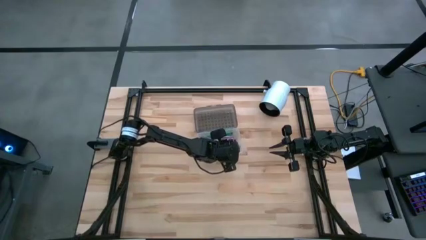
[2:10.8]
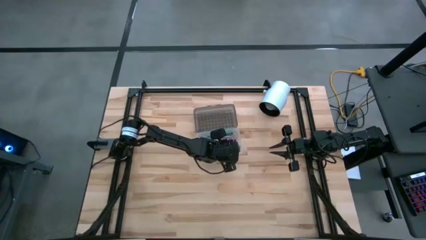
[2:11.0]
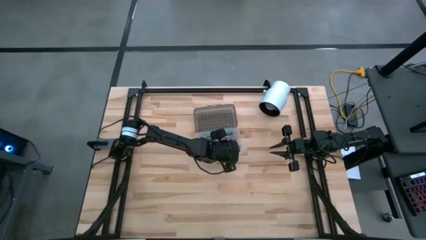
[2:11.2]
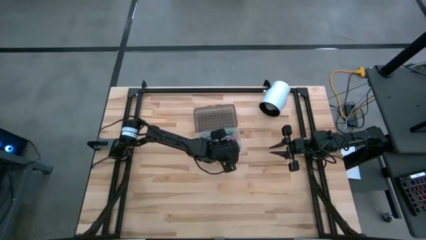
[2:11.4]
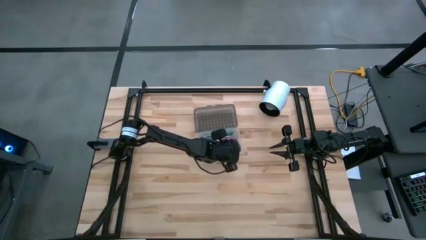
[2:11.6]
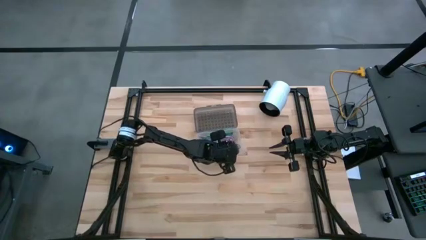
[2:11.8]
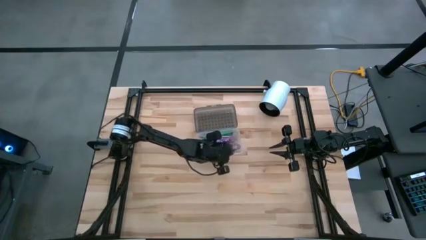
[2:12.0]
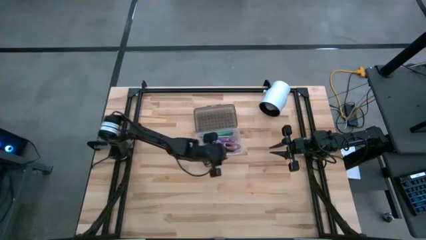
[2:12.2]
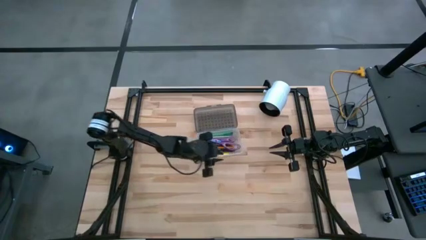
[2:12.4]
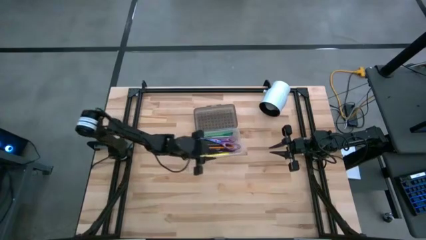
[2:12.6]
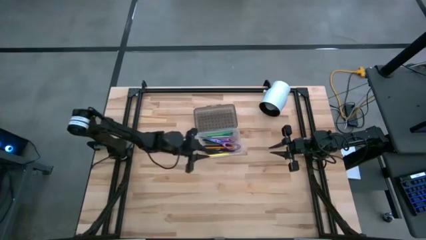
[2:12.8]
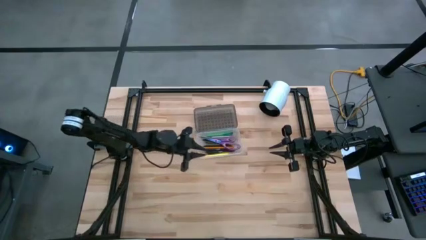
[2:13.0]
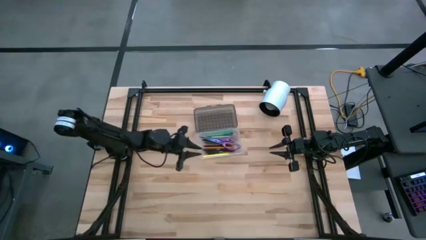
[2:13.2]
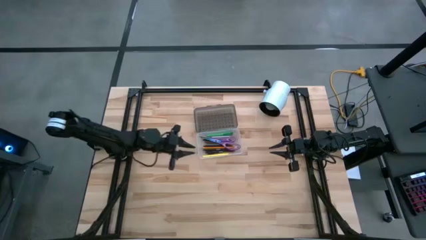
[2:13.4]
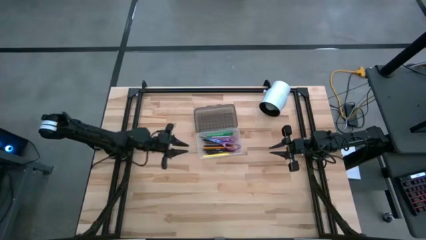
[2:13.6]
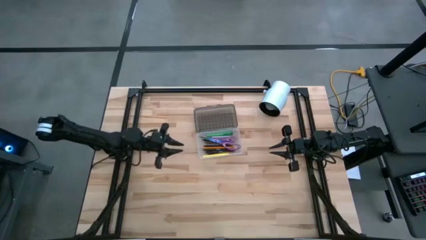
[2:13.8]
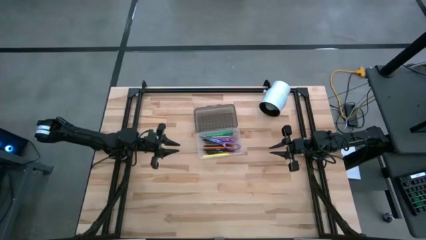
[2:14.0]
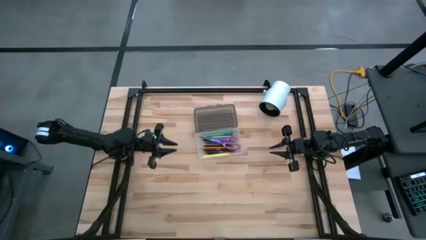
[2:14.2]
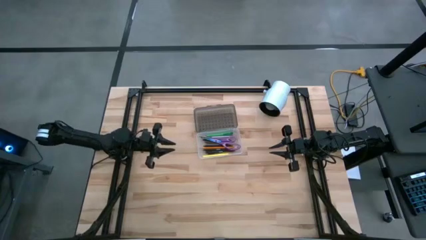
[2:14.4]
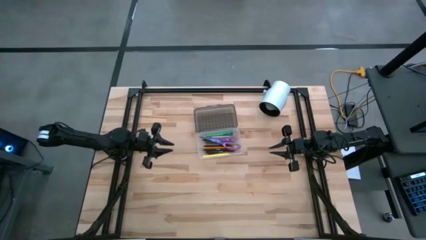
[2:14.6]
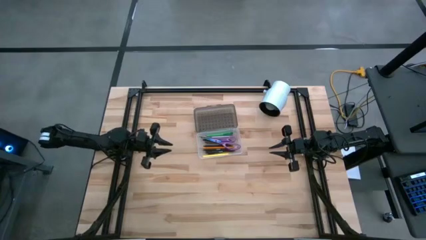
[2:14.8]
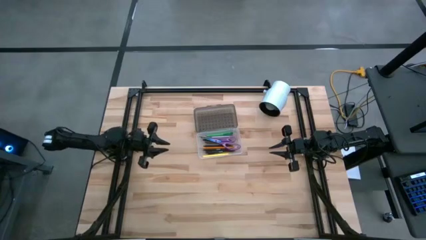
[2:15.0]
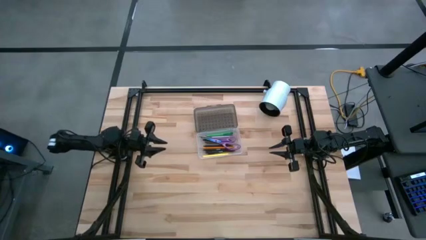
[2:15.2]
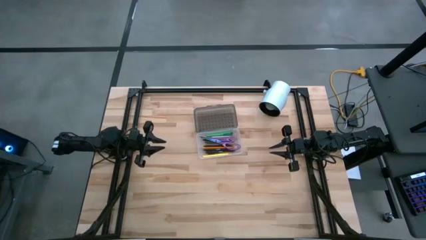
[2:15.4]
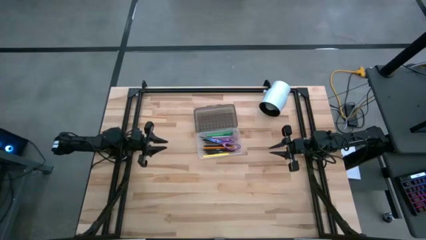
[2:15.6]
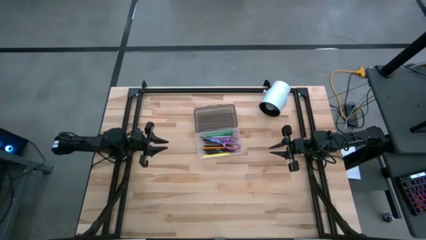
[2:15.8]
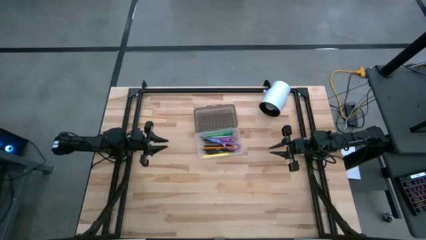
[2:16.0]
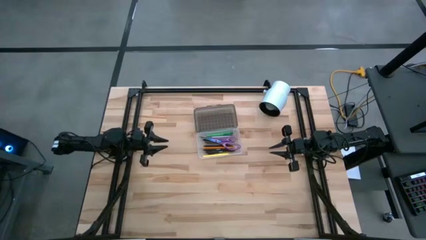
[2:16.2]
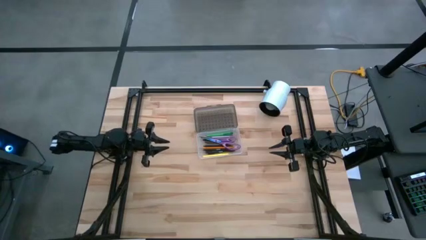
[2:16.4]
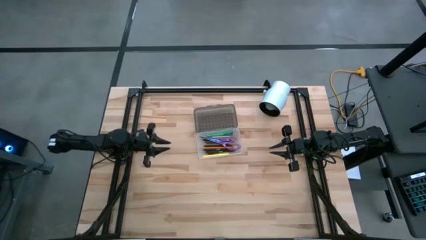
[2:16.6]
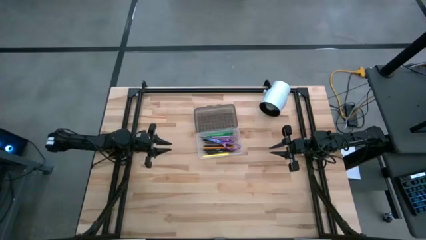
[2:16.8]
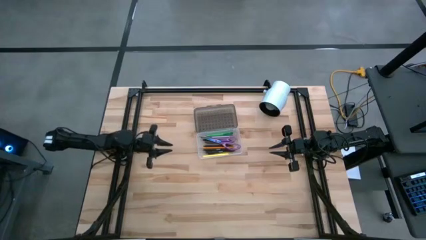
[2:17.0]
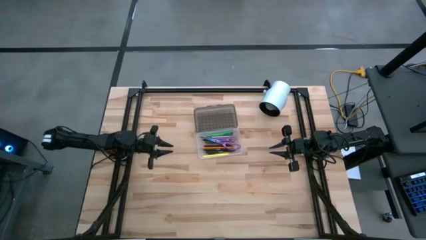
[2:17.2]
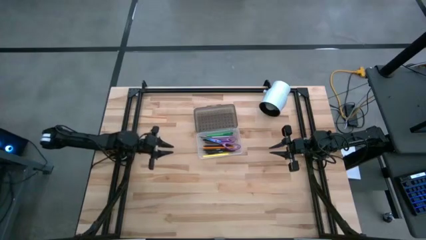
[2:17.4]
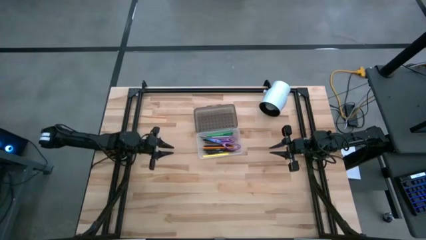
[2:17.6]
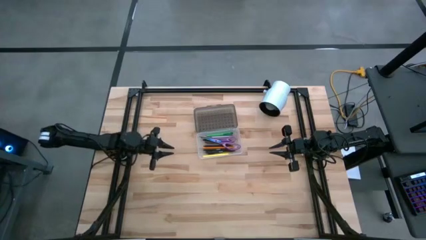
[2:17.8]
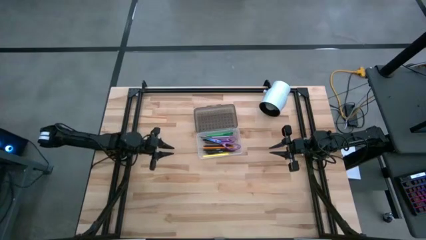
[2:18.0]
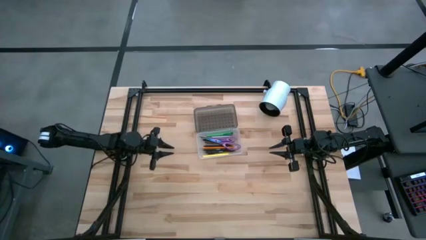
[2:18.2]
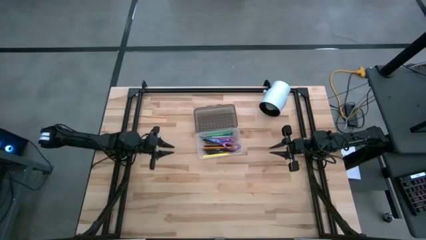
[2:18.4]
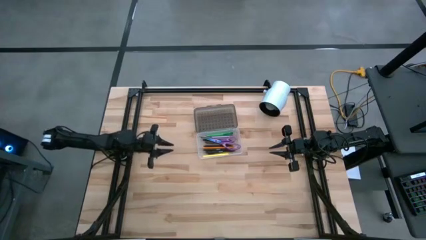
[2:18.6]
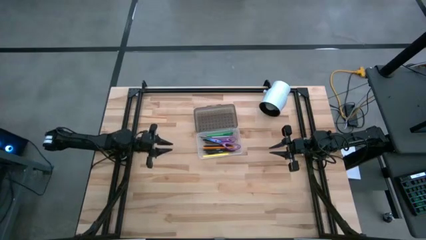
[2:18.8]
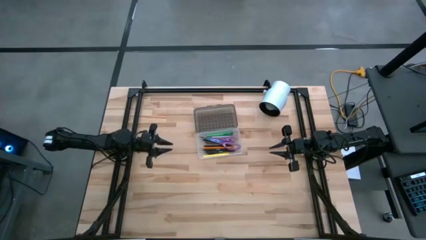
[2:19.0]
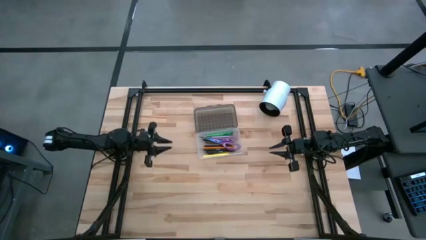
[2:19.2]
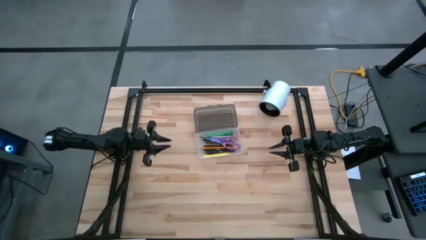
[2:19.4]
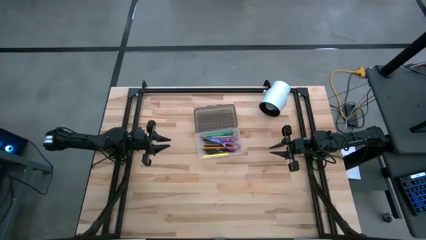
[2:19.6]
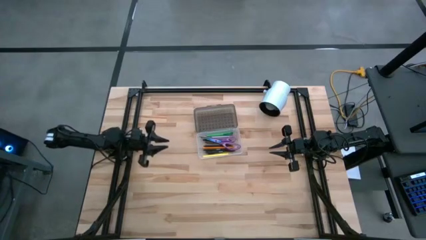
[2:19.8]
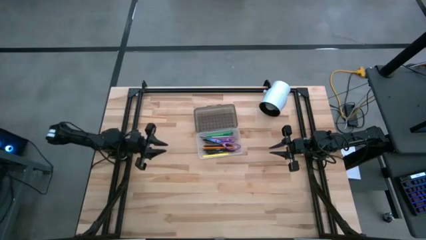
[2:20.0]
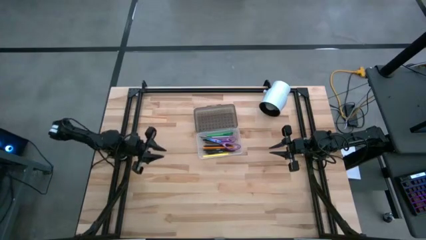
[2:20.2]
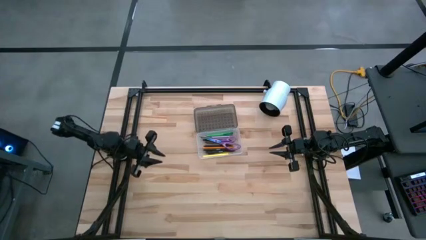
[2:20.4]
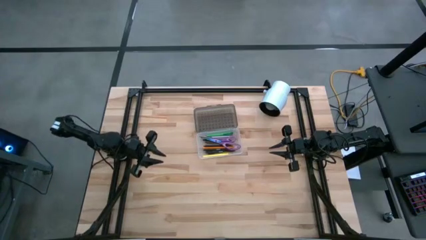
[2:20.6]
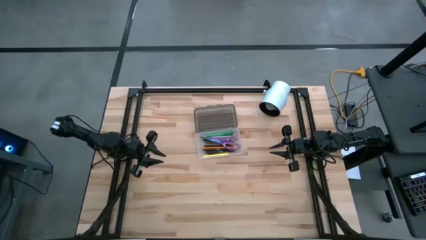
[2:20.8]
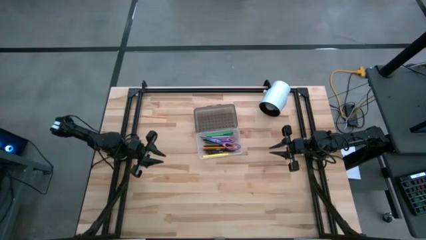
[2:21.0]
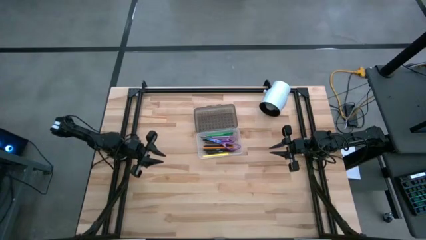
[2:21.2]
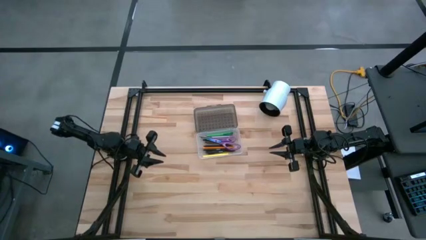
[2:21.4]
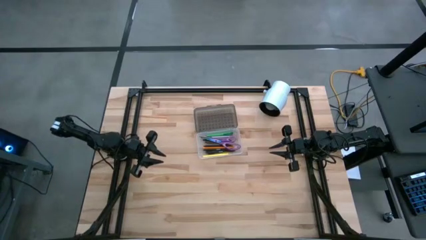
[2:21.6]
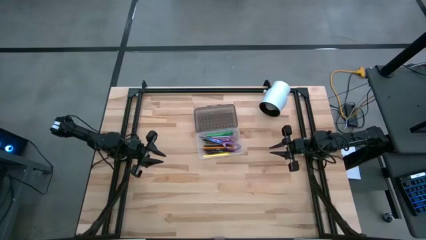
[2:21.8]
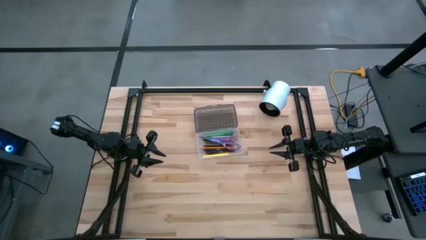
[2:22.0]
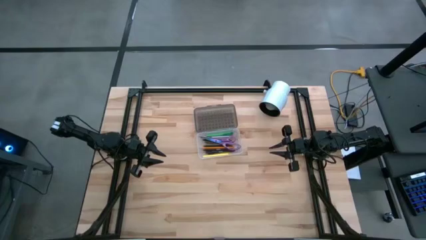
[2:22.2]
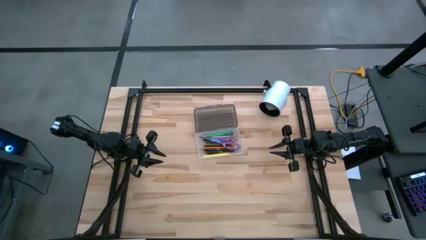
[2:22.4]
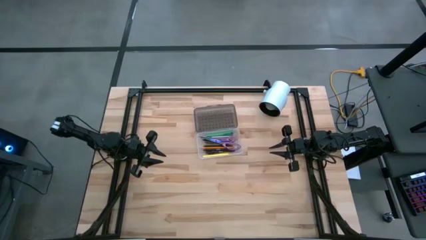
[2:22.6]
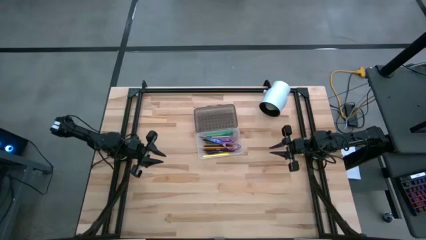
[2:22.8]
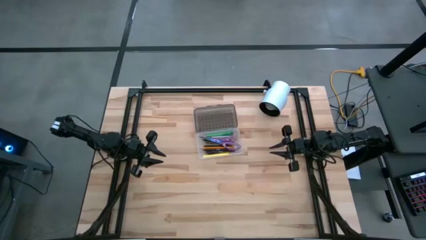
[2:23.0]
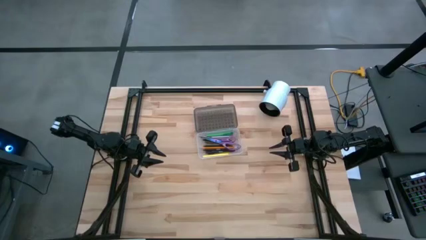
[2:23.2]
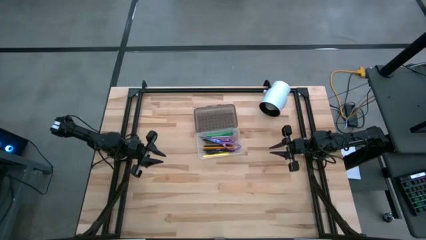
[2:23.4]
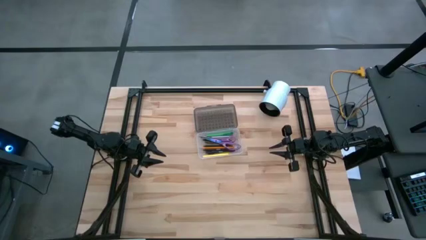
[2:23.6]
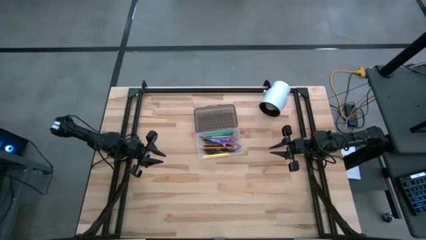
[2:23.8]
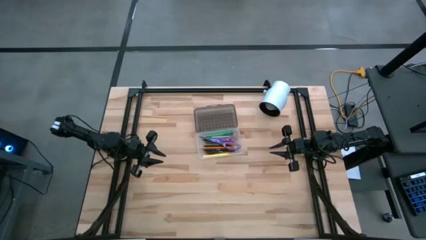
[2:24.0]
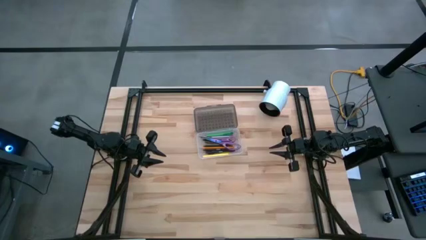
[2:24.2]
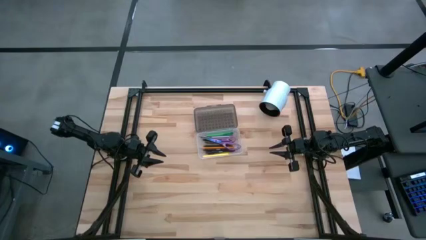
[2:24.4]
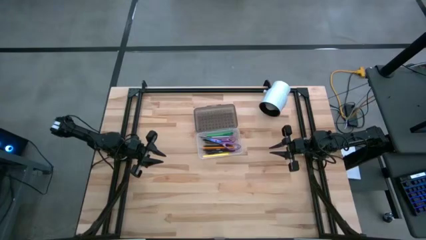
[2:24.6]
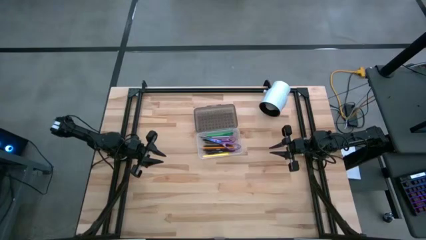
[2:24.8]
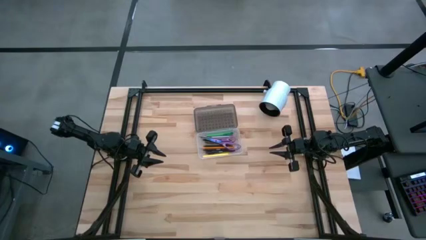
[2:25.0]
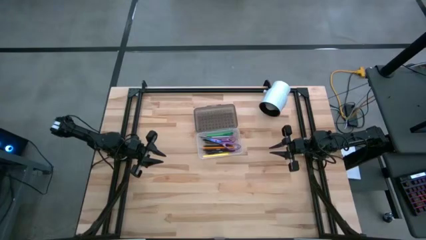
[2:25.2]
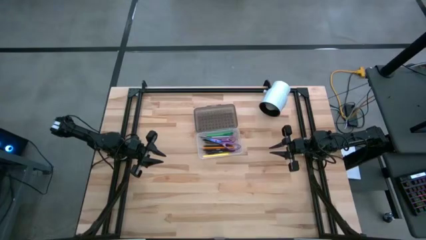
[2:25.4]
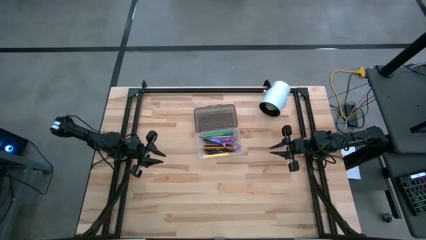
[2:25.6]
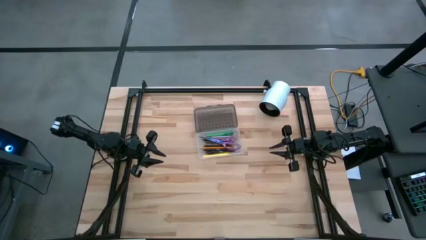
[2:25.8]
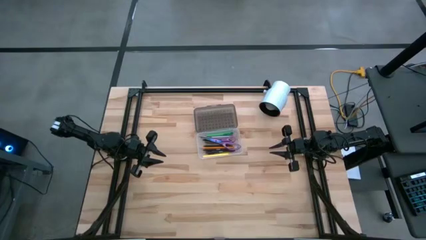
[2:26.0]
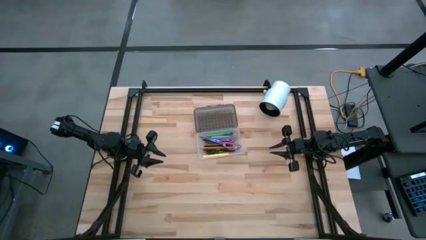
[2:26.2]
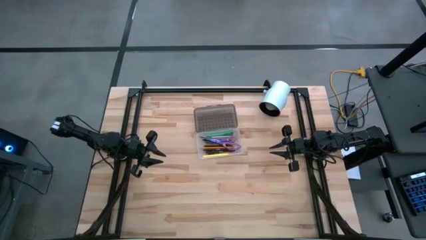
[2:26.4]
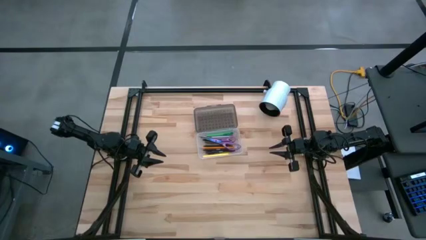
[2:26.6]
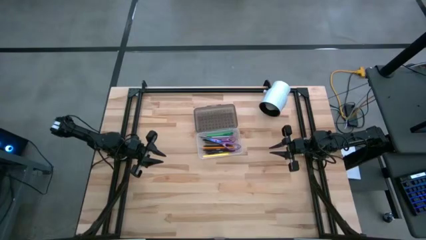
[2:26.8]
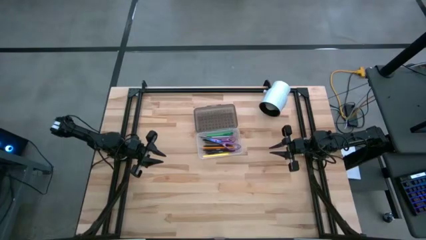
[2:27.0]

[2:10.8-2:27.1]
Task: Pick & place school supplies into a supply box
Return to Home Position
